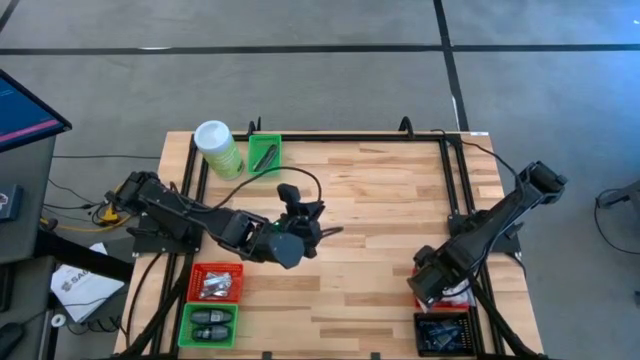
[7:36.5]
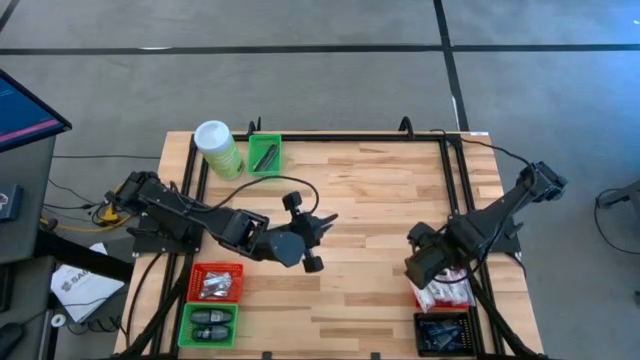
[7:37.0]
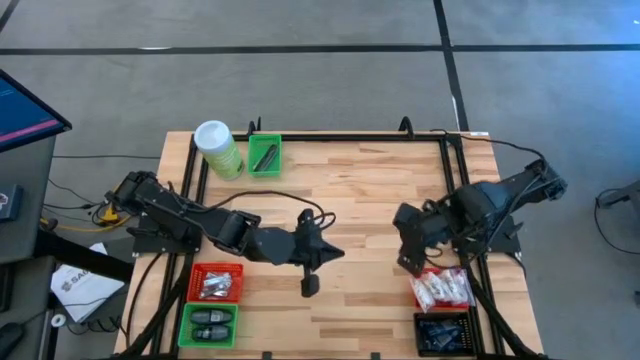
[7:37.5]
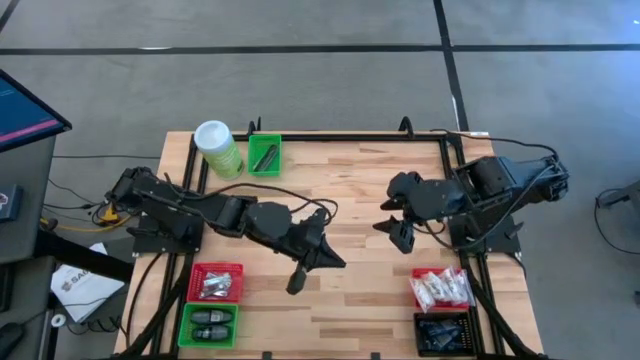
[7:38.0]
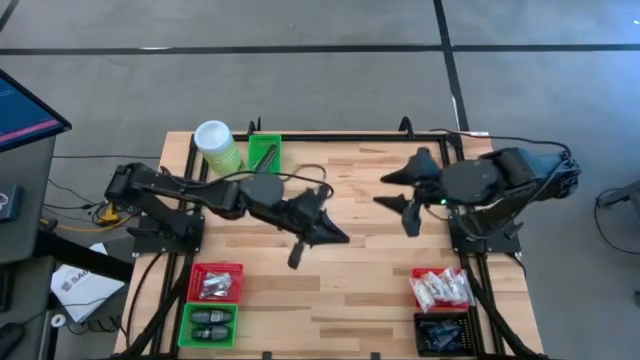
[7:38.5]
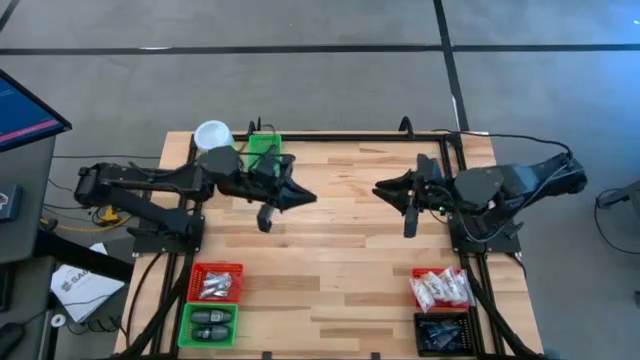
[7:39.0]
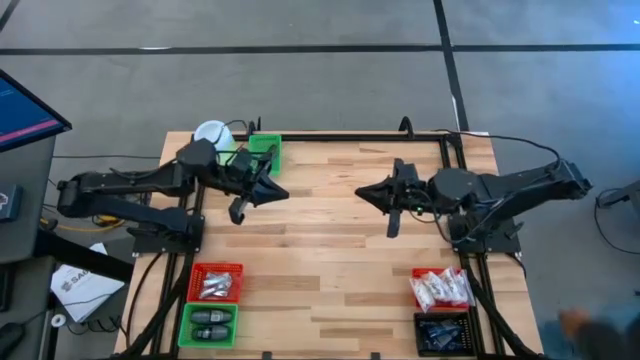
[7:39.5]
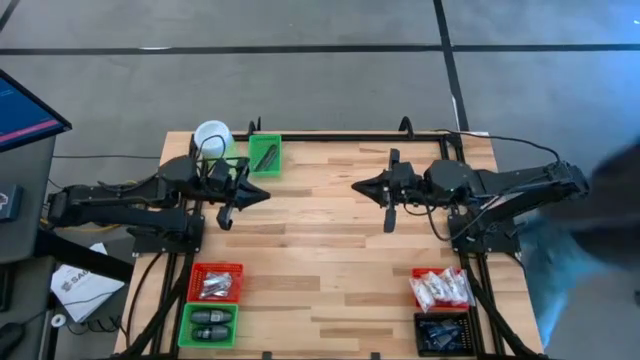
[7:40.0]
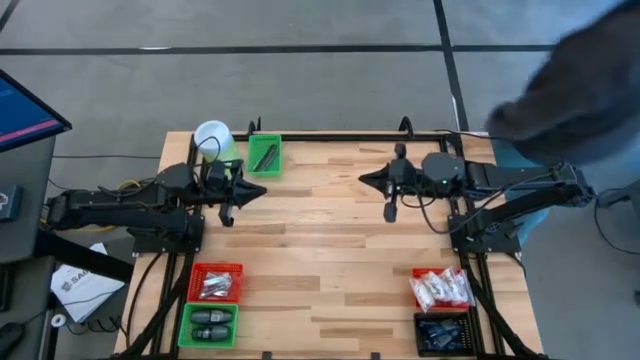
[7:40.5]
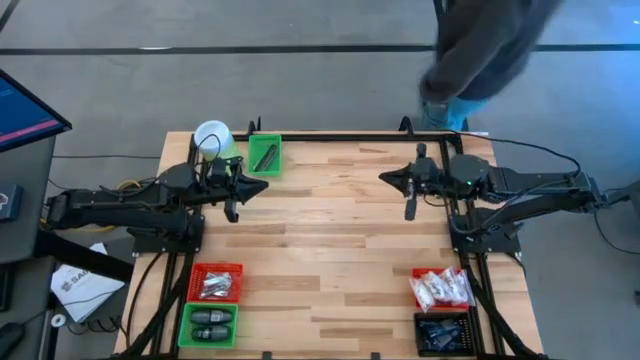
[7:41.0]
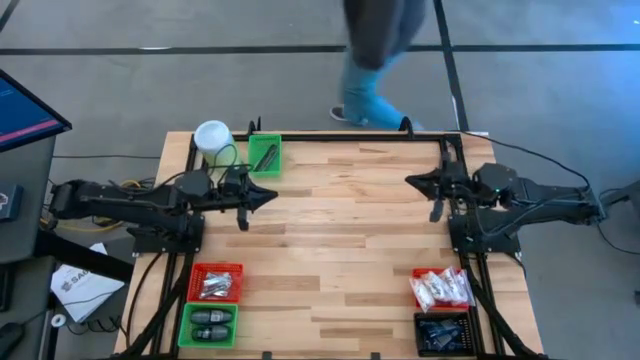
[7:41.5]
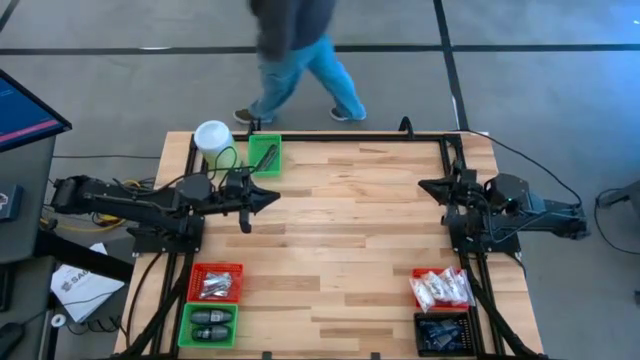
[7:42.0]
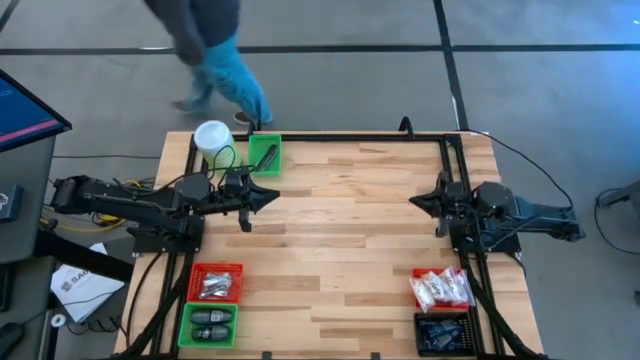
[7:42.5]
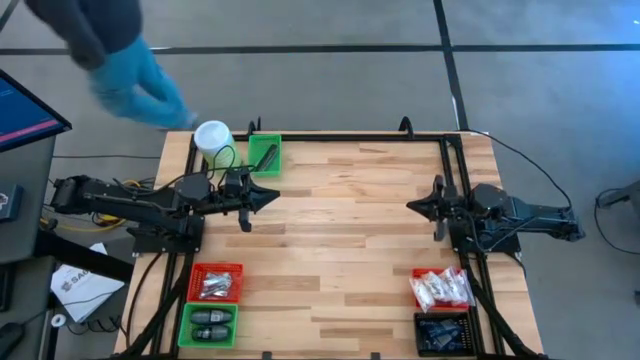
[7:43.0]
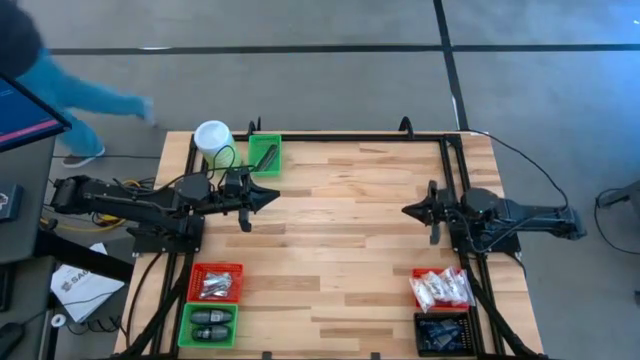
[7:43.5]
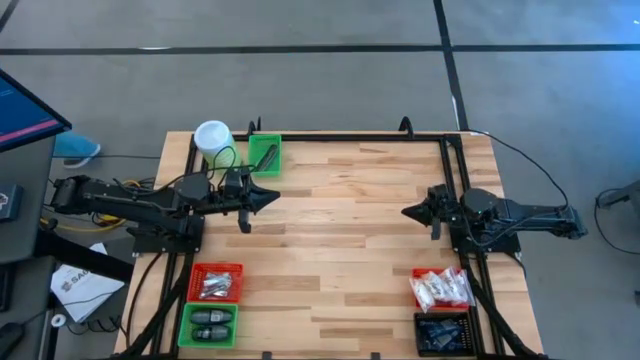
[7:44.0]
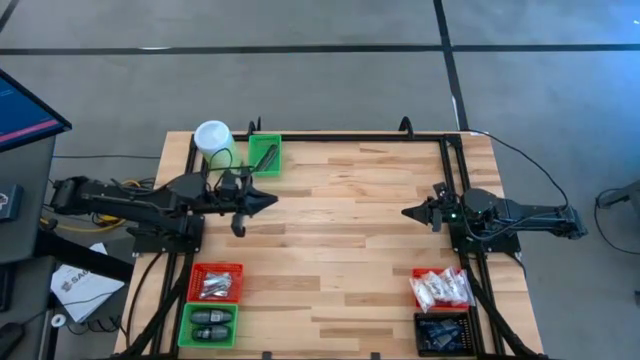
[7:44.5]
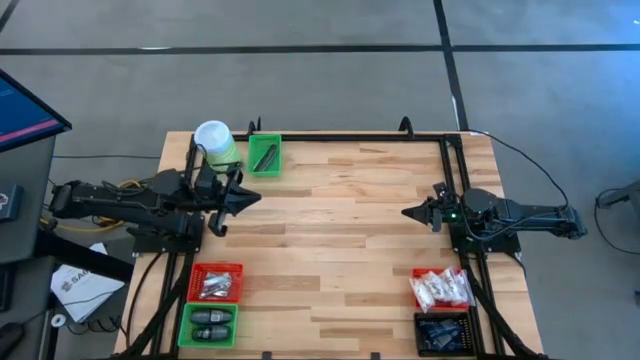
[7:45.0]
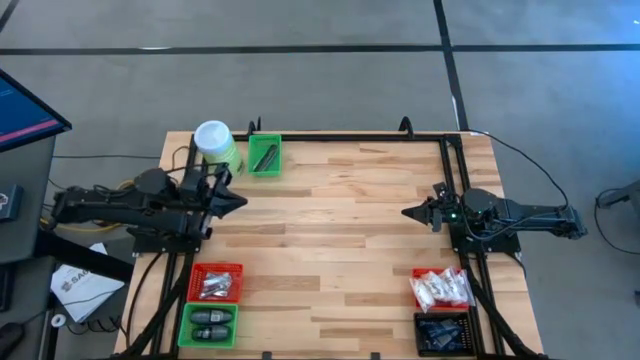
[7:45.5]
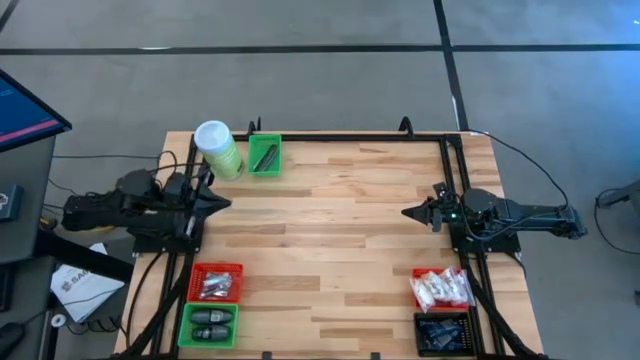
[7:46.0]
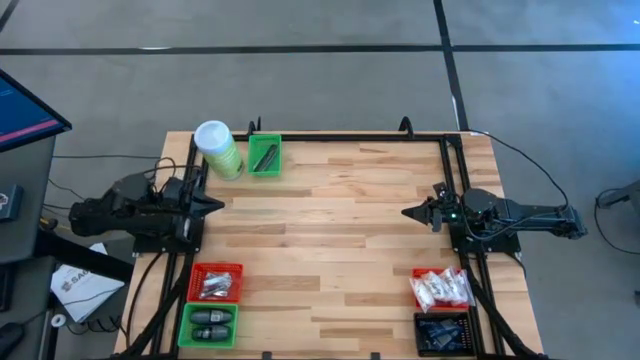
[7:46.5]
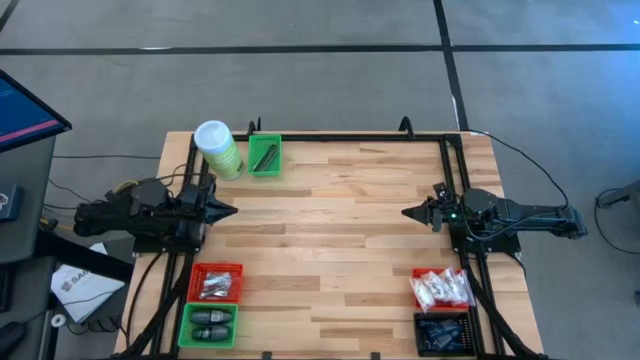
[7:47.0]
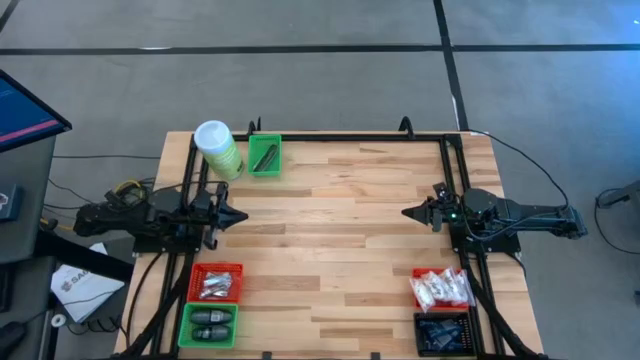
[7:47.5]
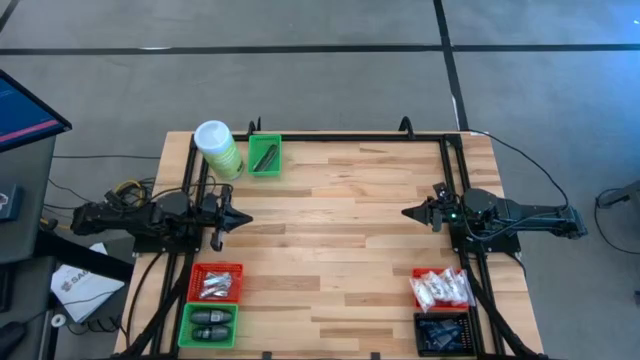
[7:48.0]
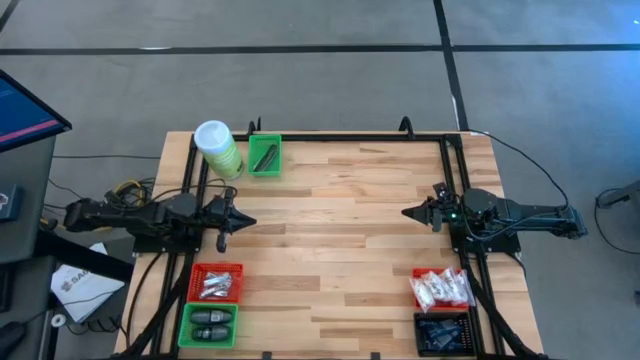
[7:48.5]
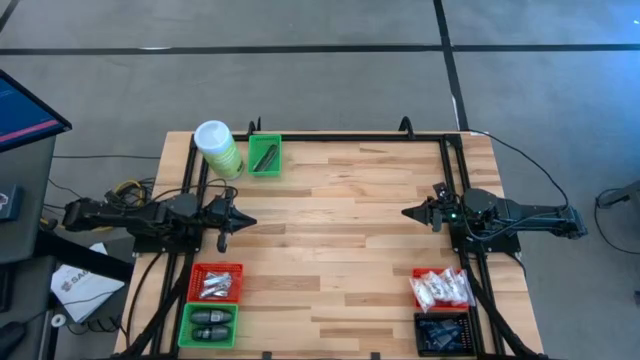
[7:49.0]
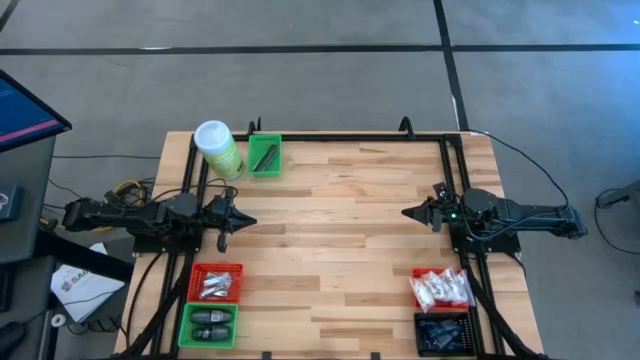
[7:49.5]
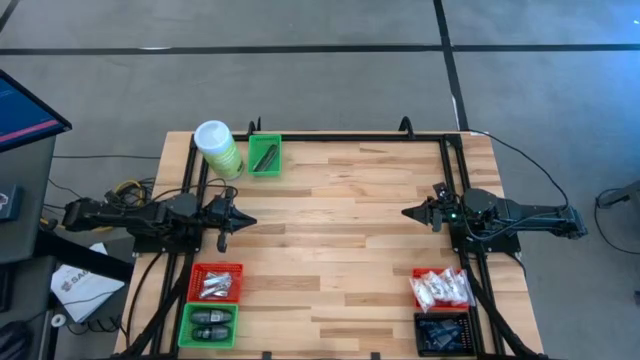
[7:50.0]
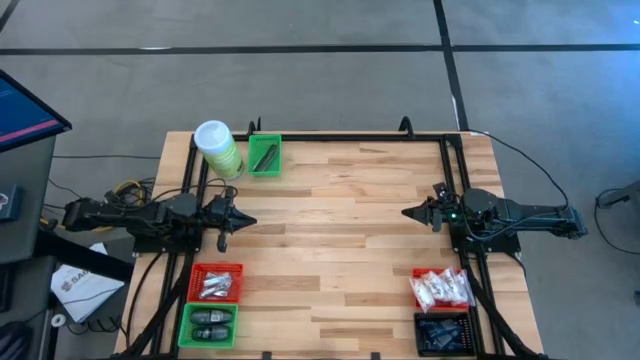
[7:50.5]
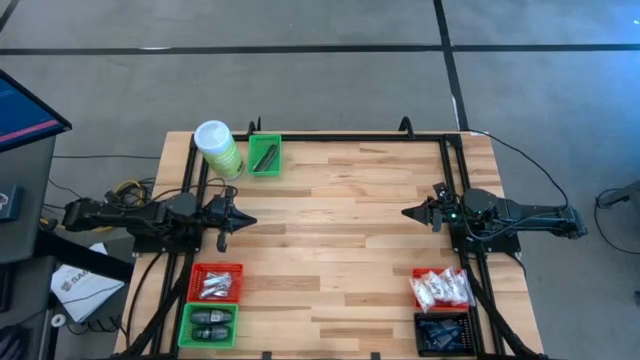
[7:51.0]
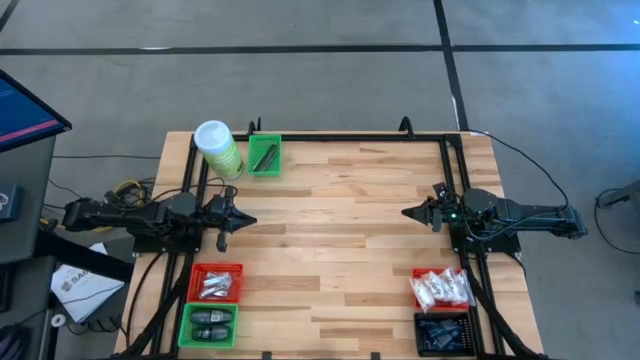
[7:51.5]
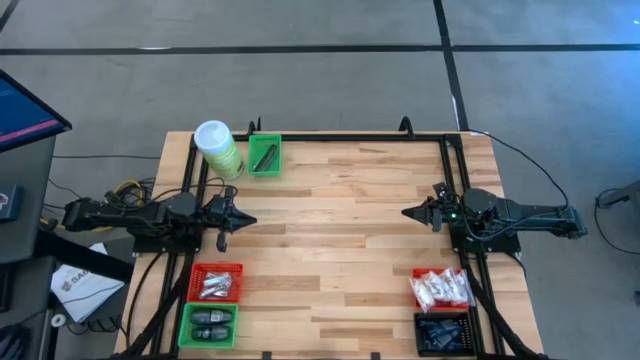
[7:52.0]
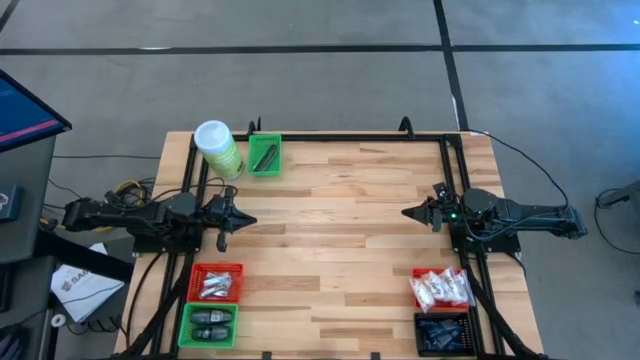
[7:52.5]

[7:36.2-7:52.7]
Task: Pick & Place Travel size toiletries
Return to Home Position

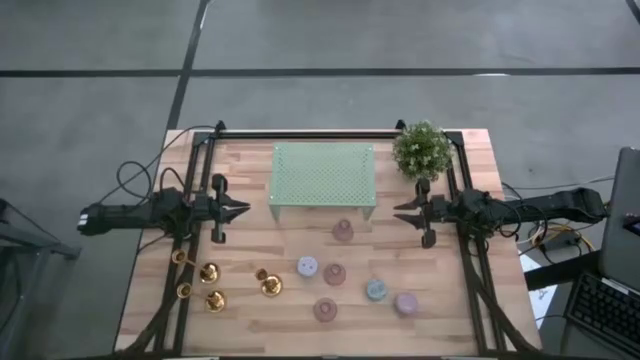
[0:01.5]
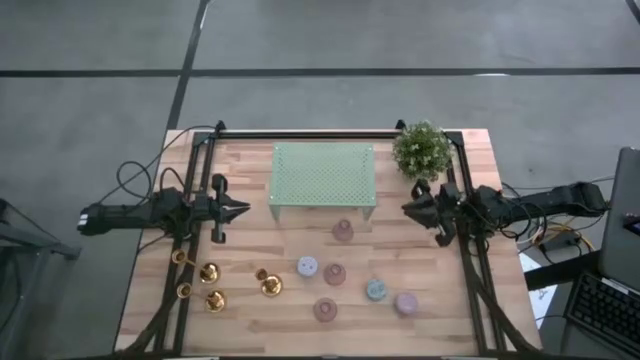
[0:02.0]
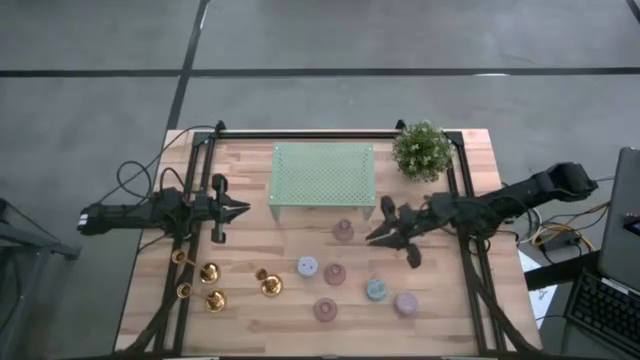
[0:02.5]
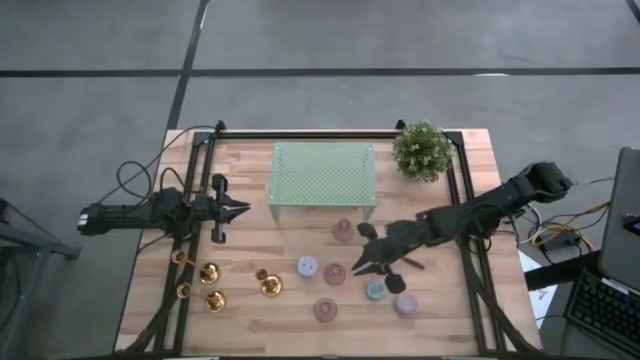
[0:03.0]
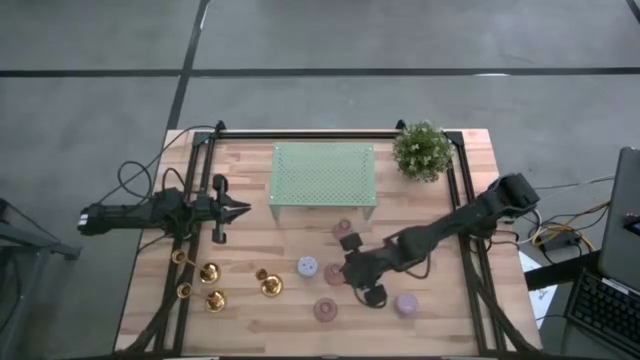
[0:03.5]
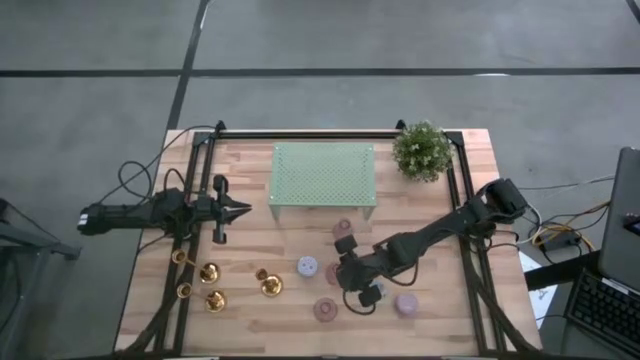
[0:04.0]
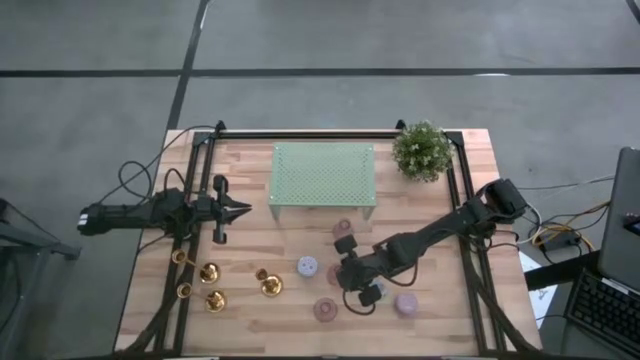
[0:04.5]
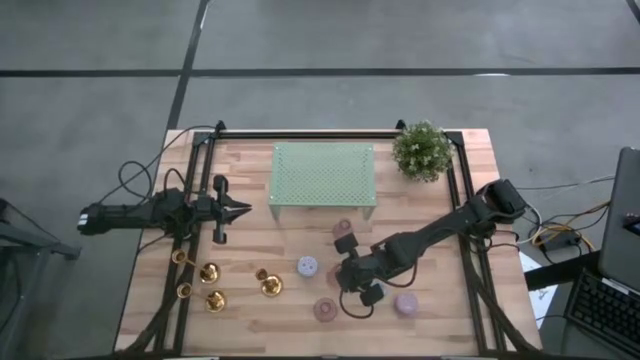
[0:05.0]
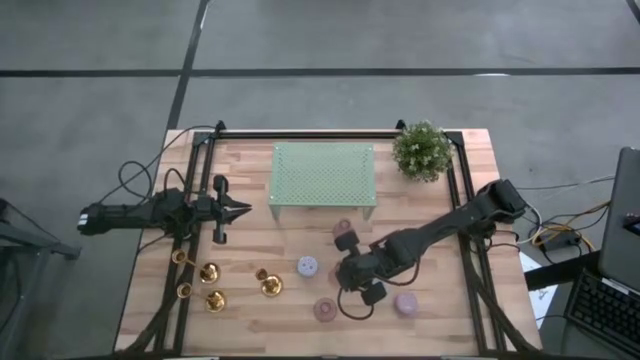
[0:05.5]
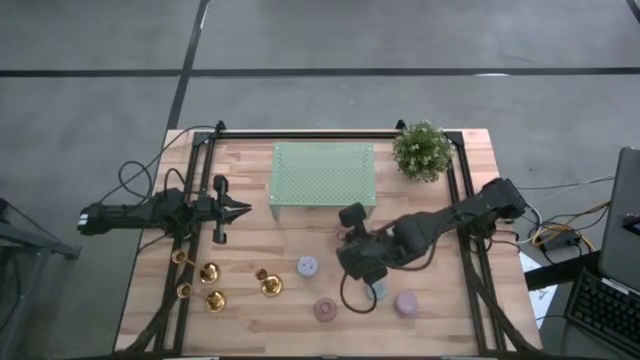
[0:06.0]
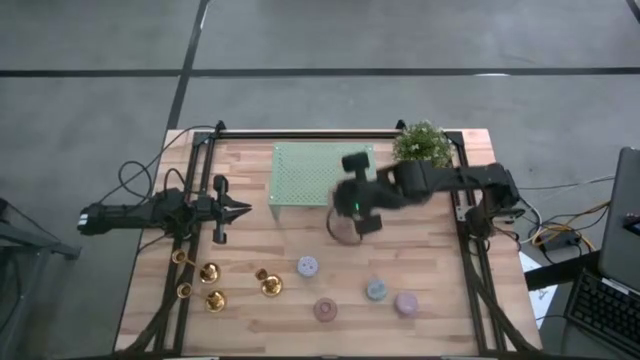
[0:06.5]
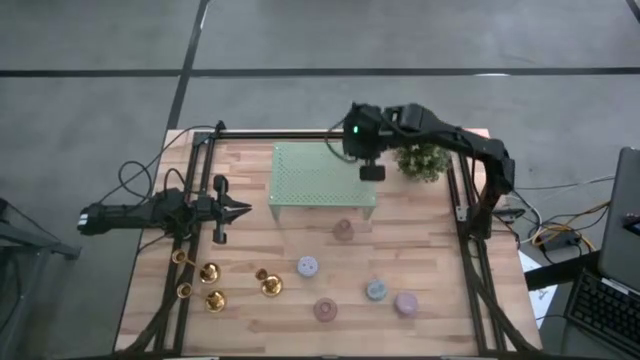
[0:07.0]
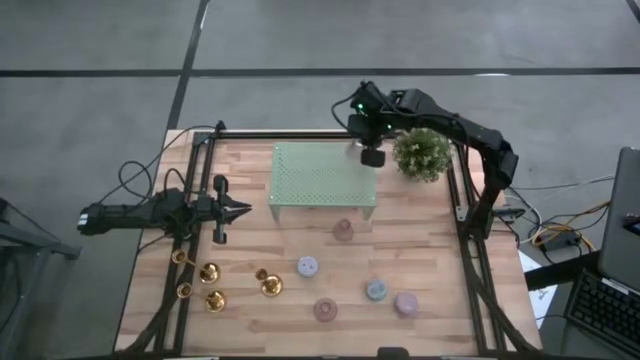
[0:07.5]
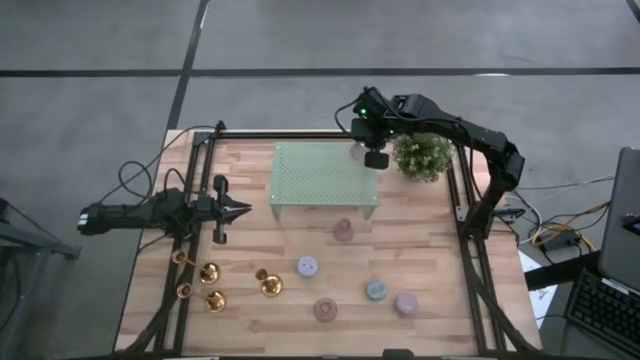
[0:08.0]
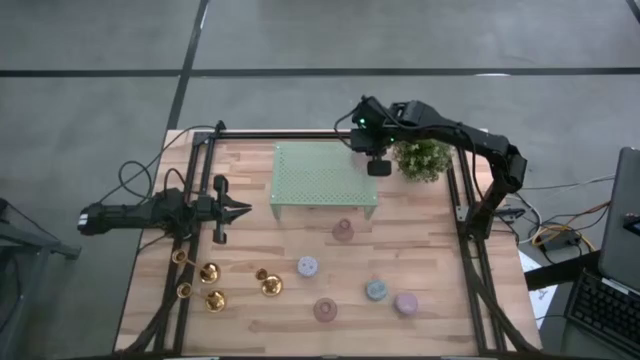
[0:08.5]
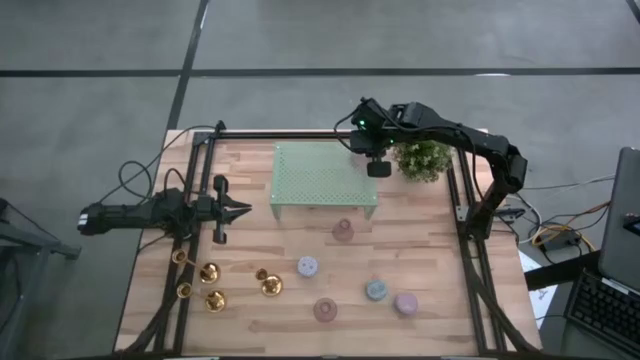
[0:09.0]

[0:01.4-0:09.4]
Task: Pick & Place candle stick holders
Put the middle pink candle holder on the shelf
